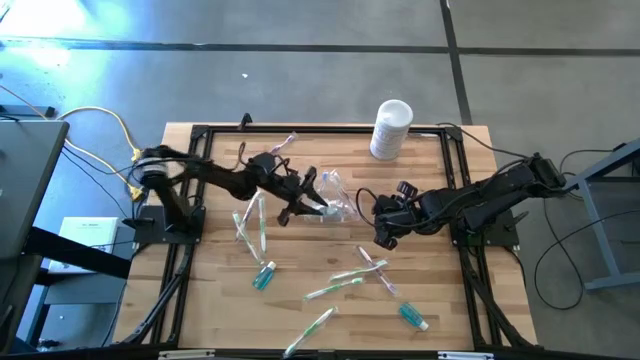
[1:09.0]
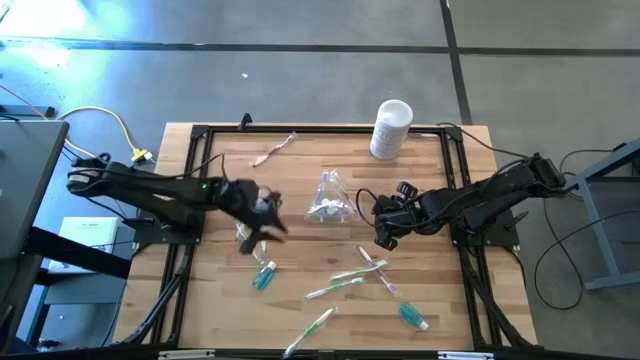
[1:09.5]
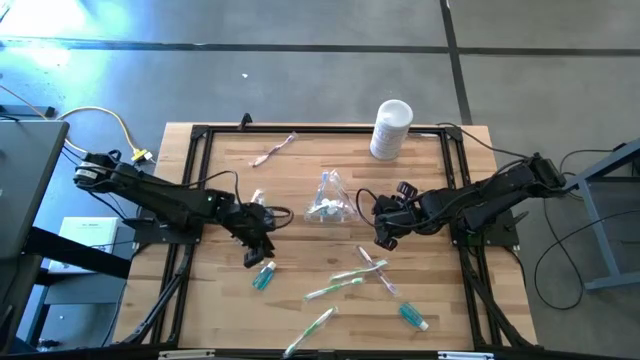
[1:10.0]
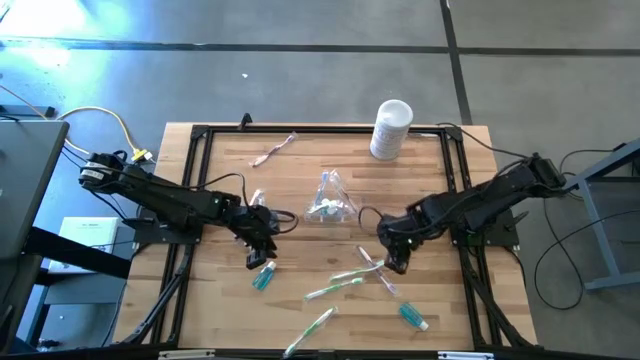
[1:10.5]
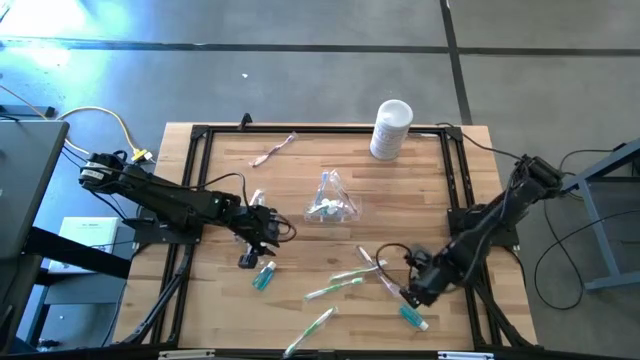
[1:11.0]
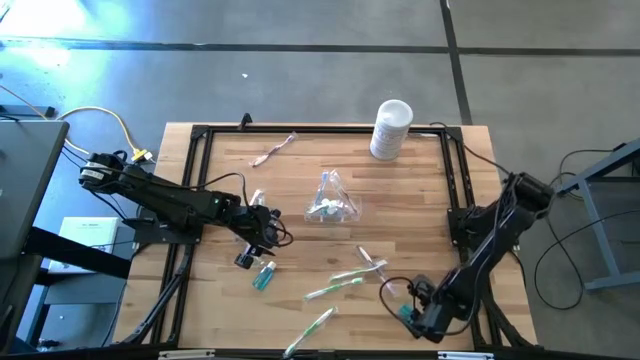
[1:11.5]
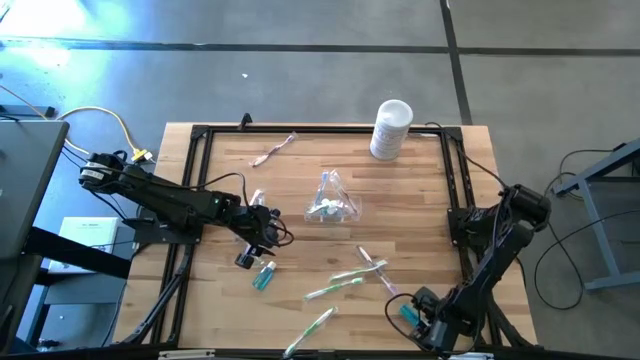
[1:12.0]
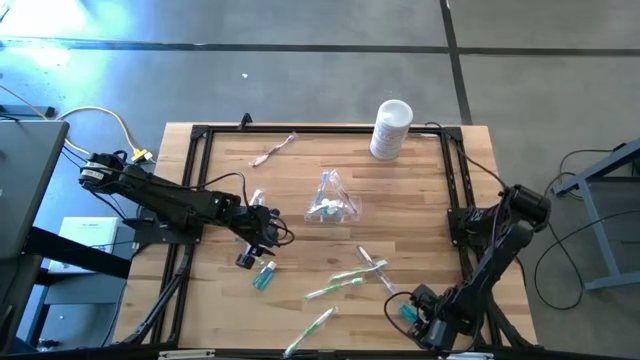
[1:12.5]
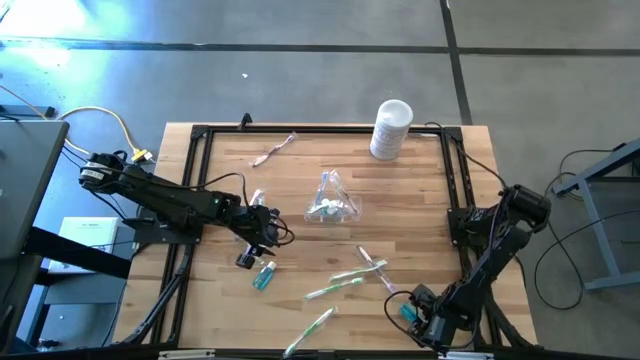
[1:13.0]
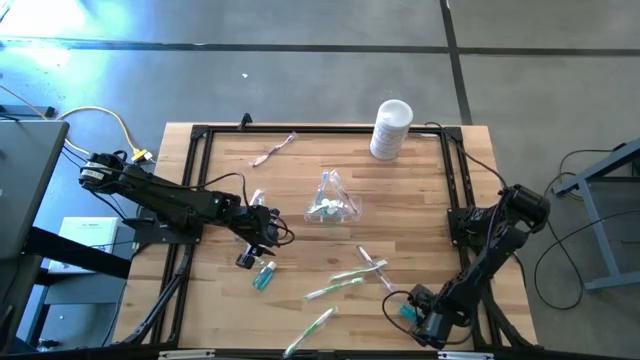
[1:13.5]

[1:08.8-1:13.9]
Task: Pick & Place toothbrushing station
Put the blue mouthwash bottle into the transparent organizer

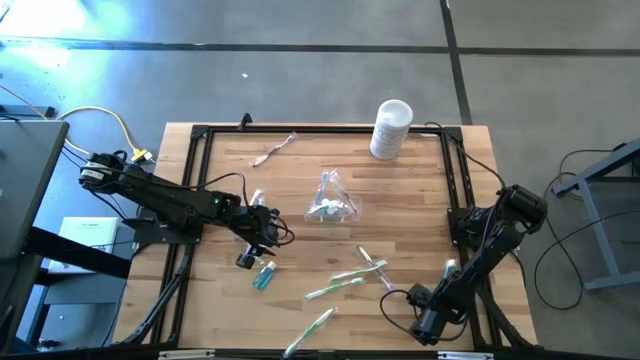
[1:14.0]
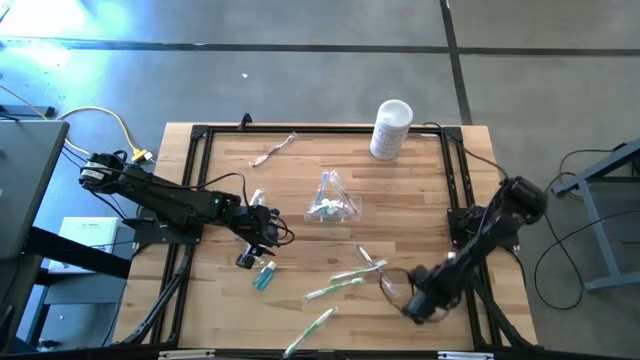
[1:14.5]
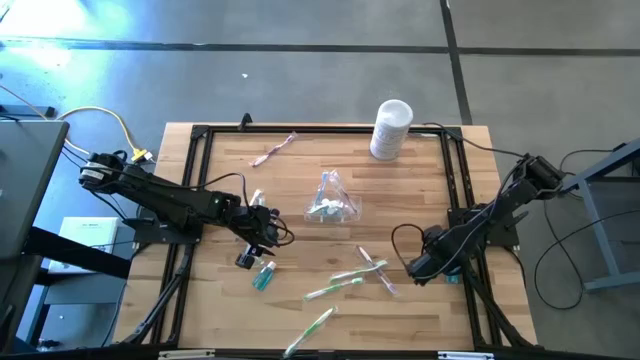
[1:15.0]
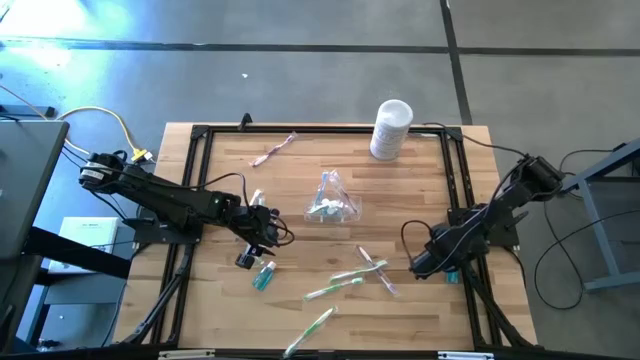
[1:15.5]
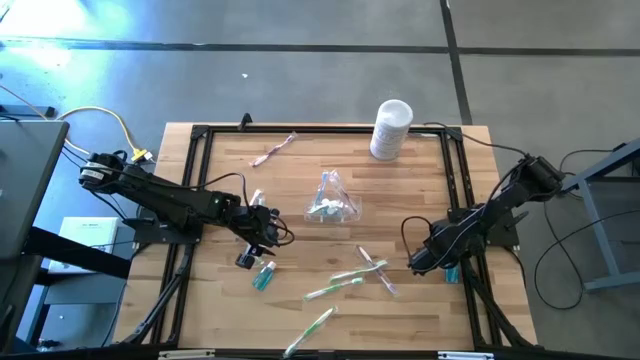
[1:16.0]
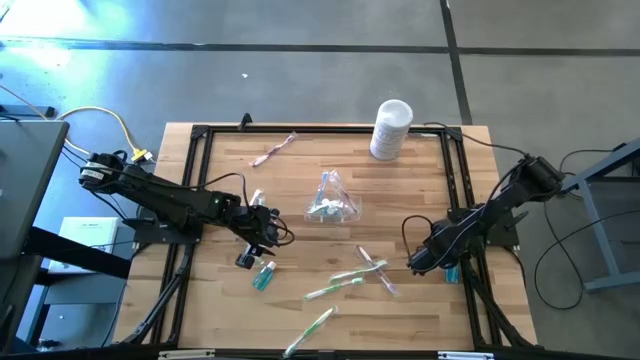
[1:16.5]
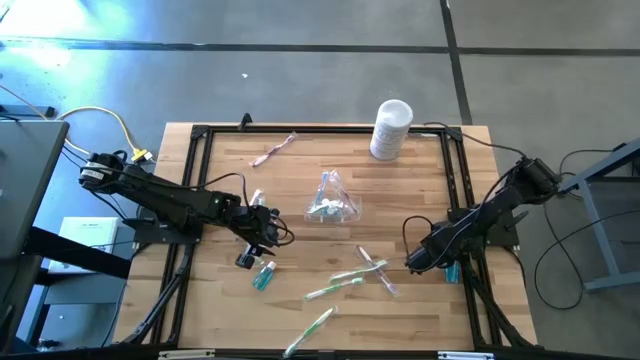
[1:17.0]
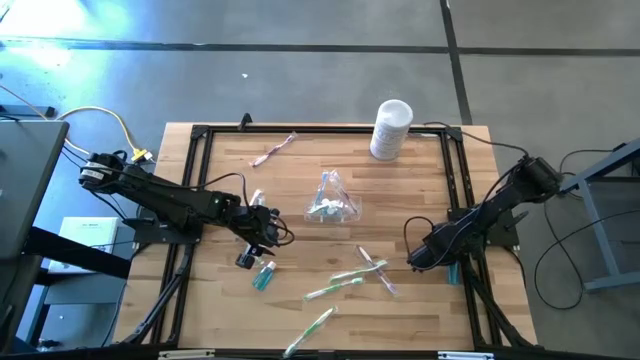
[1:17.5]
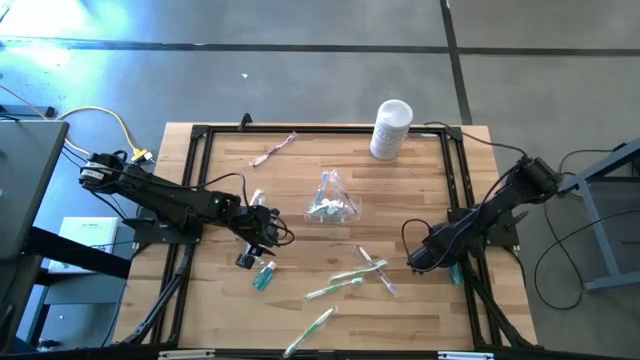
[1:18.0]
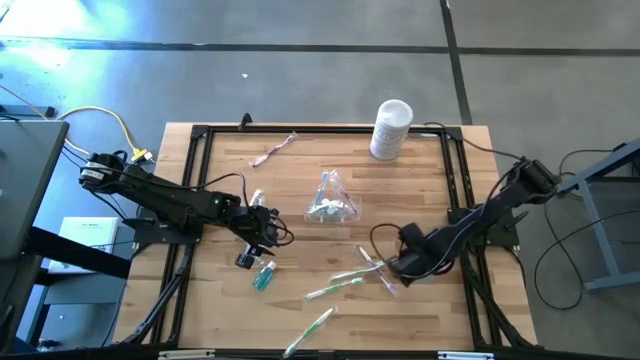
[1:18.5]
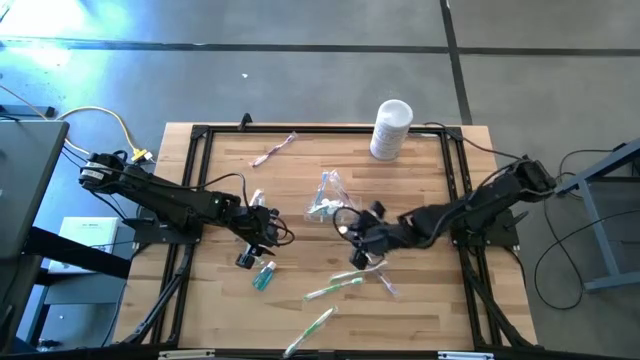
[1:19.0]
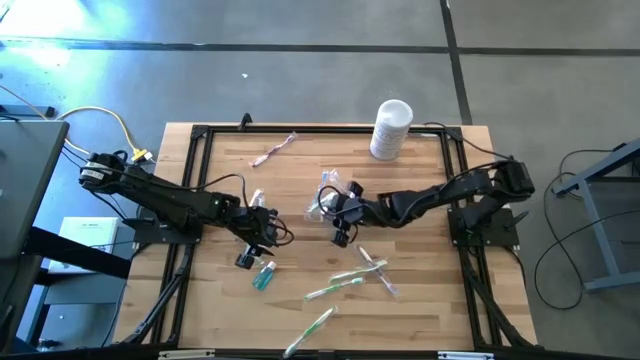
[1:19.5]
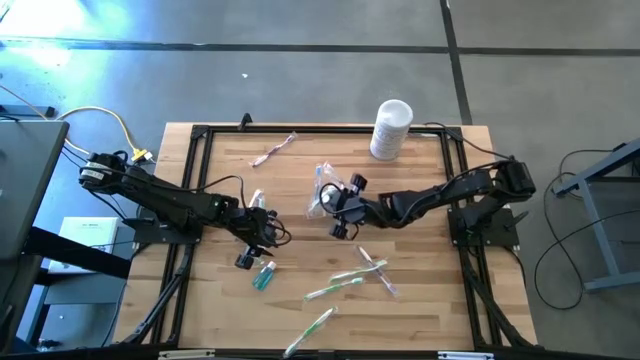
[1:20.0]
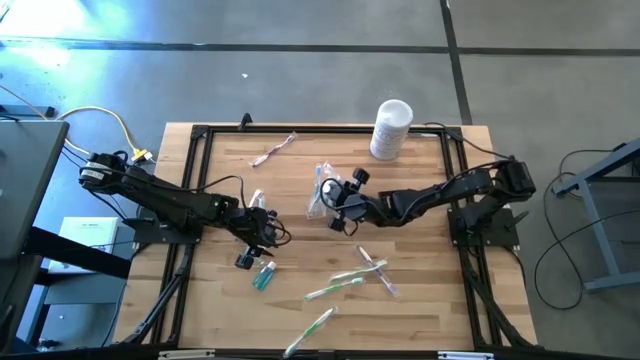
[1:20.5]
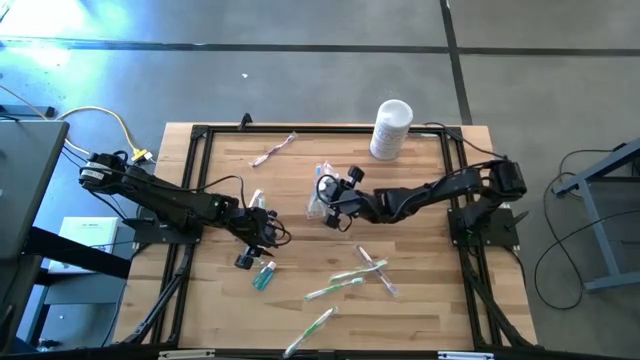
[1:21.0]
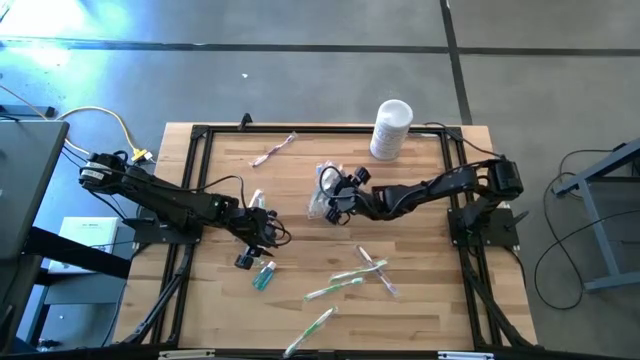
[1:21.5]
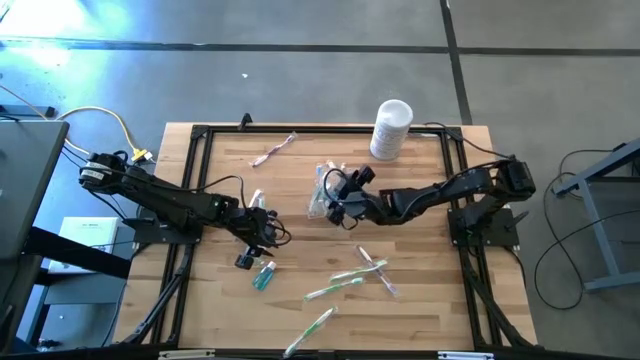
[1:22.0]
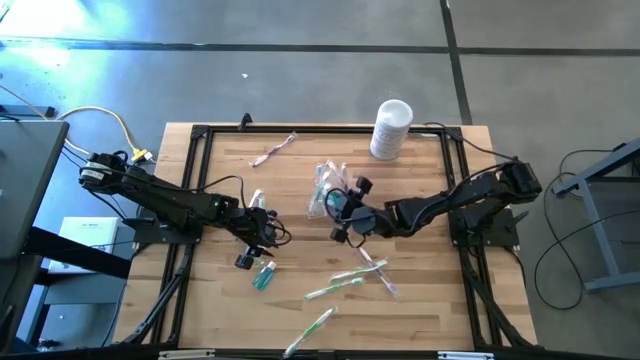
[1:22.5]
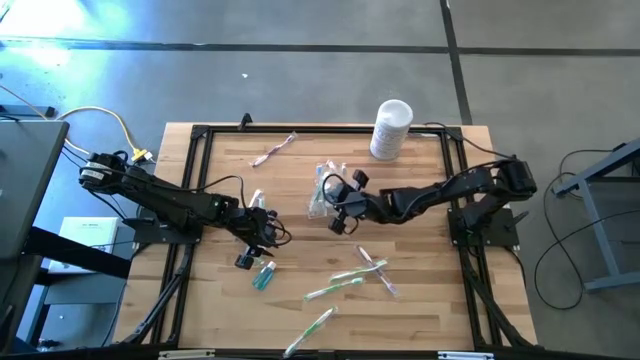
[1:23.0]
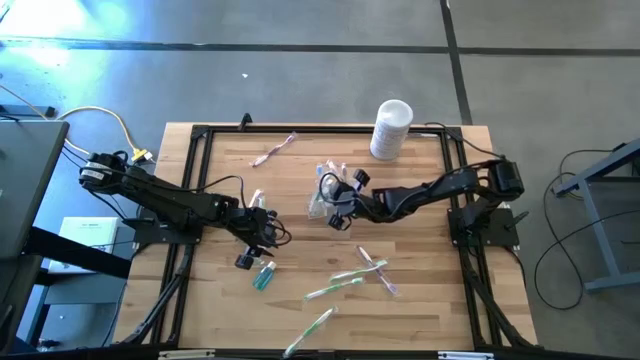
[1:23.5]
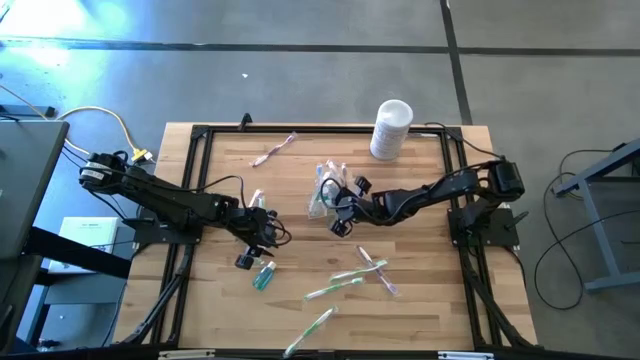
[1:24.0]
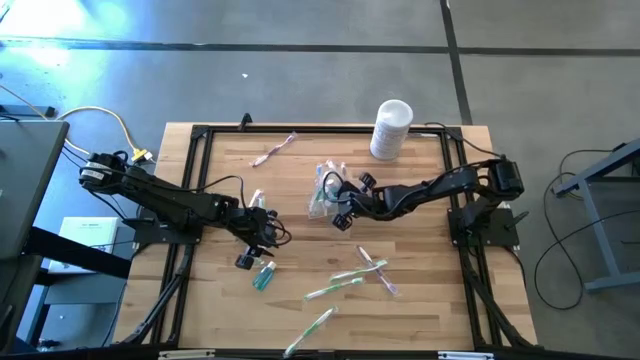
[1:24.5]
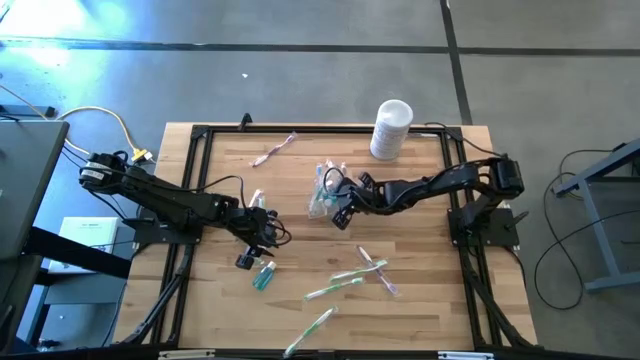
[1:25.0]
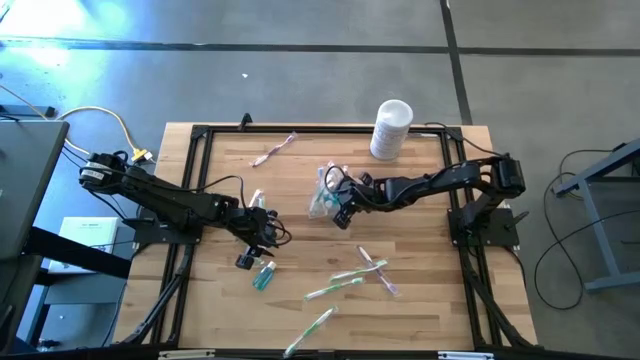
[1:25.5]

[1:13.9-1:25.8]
Put the blue mouthwash bottle into the transparent organizer

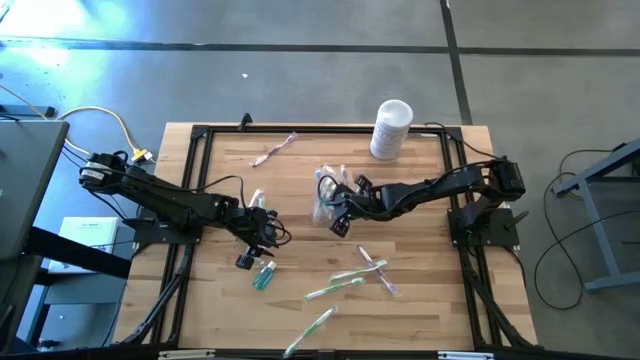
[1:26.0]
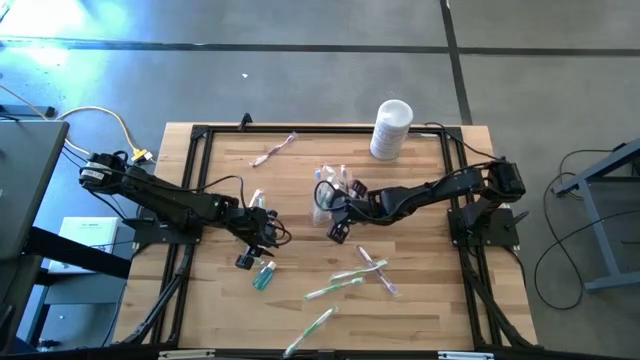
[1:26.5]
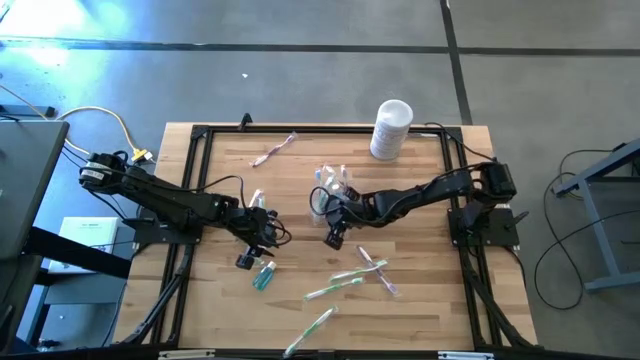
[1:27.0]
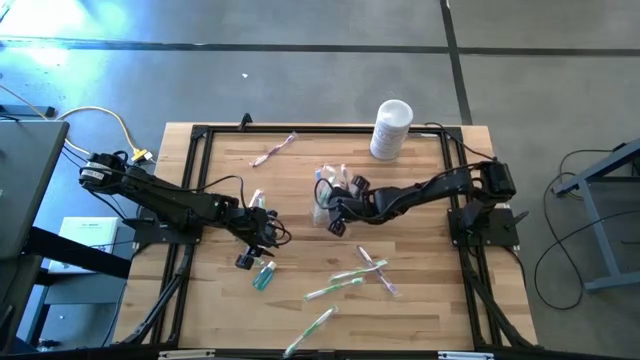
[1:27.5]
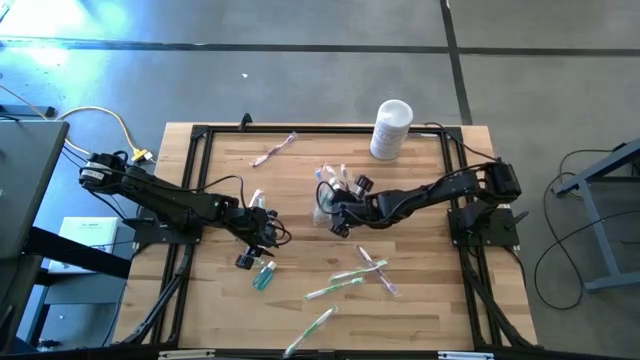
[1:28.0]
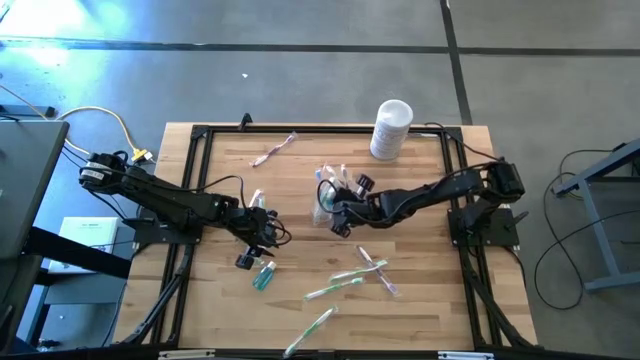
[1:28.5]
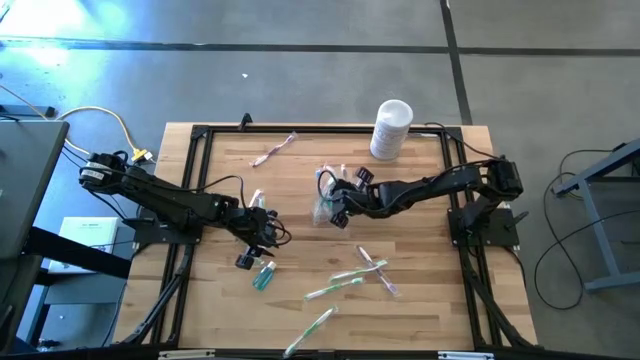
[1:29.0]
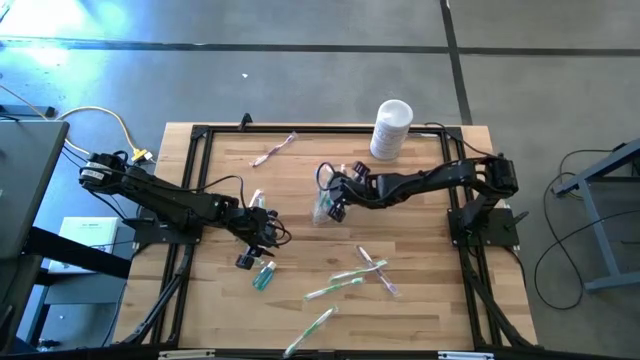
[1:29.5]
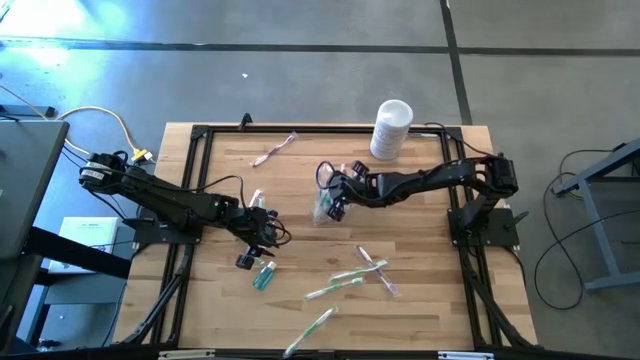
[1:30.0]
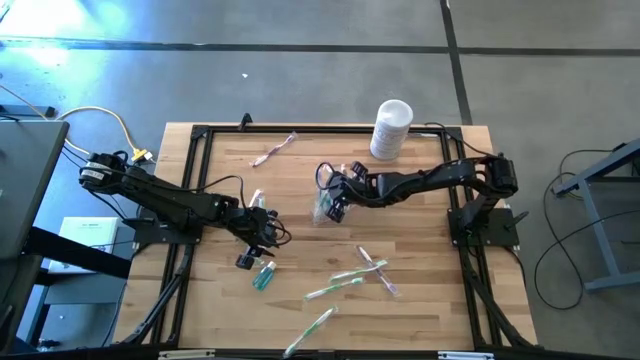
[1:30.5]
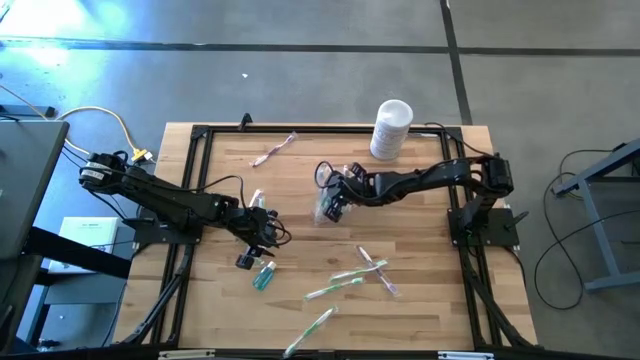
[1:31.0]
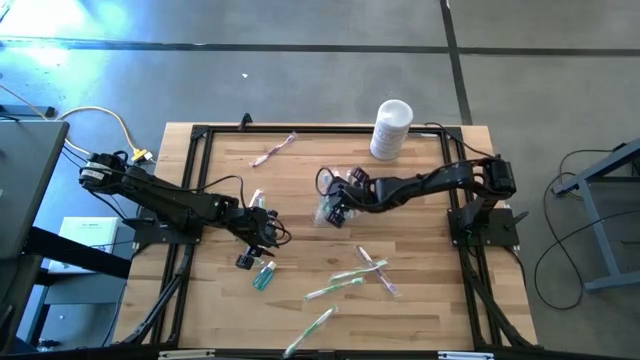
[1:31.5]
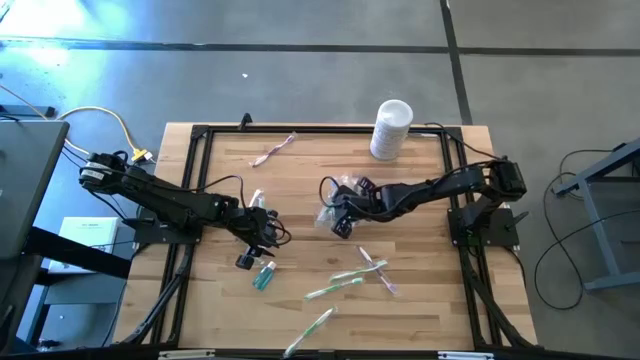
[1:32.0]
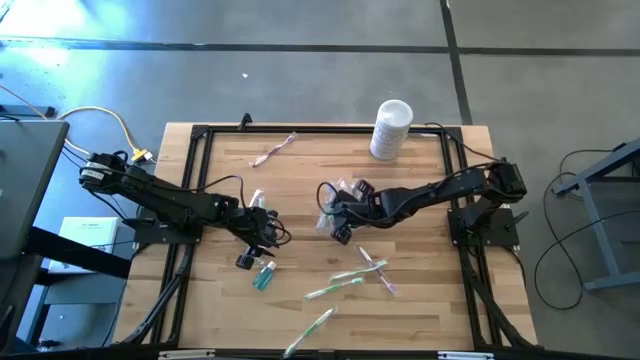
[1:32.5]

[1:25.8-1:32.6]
Adjust the blue mouthwash bottles in the transparent organizer
